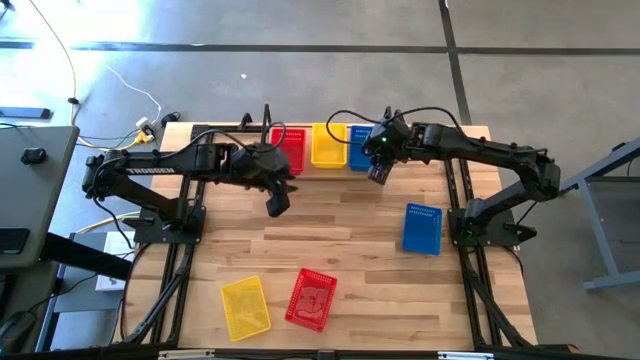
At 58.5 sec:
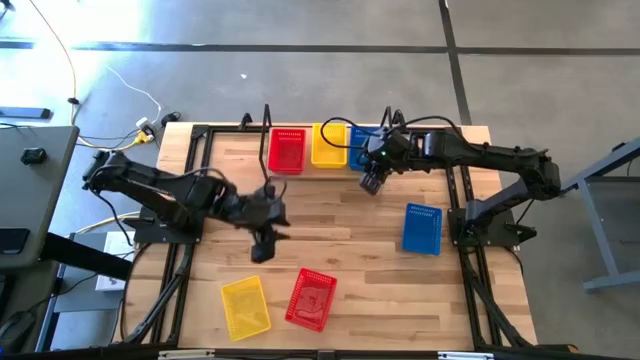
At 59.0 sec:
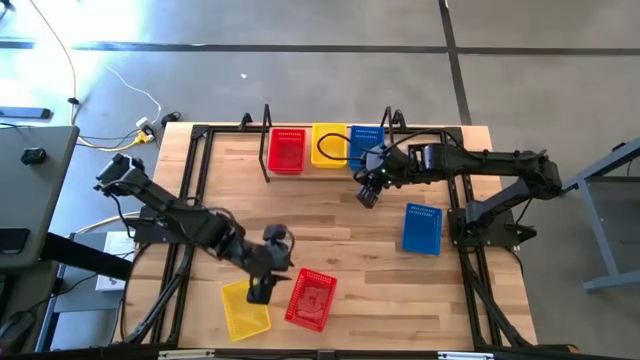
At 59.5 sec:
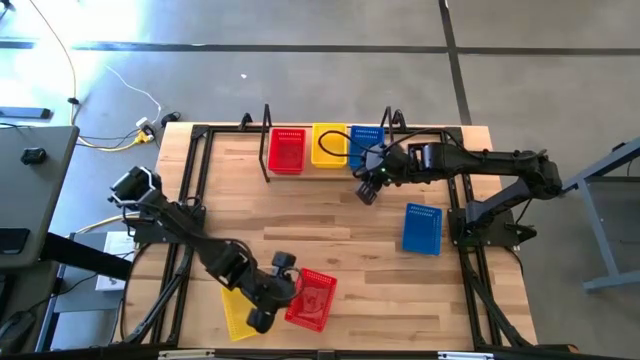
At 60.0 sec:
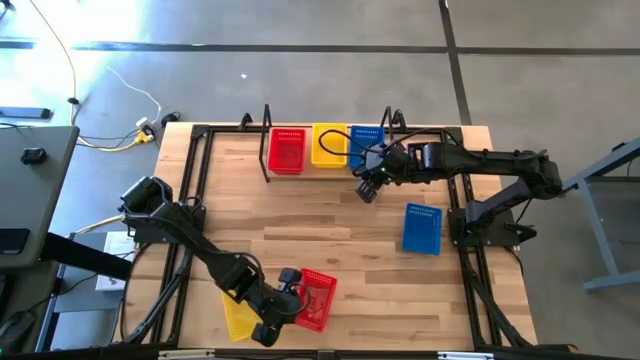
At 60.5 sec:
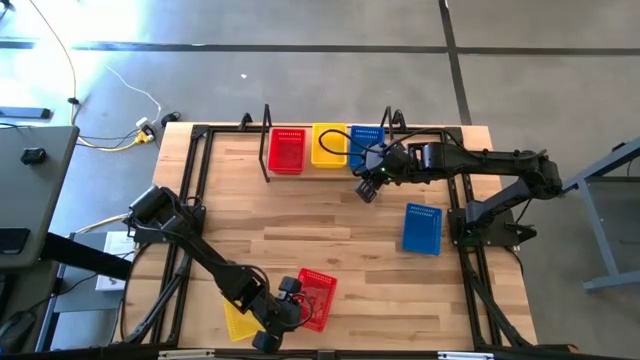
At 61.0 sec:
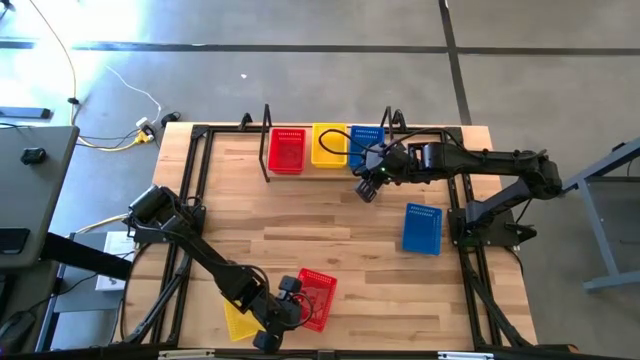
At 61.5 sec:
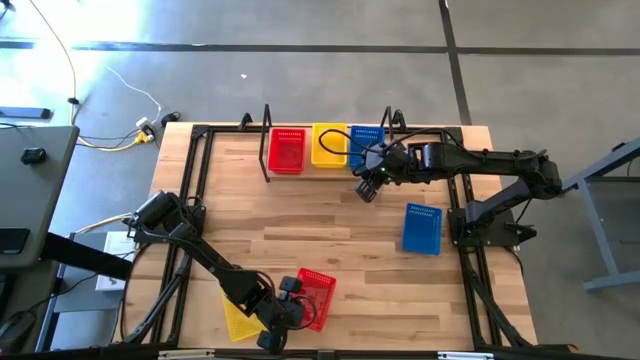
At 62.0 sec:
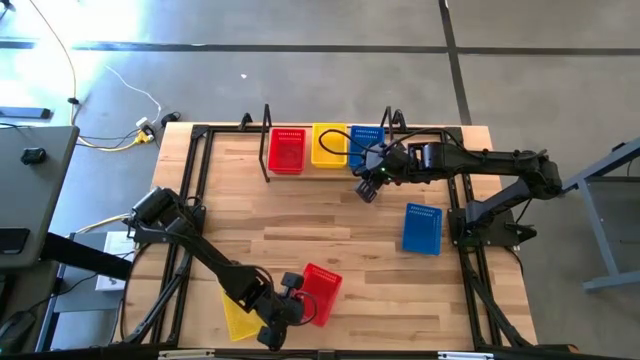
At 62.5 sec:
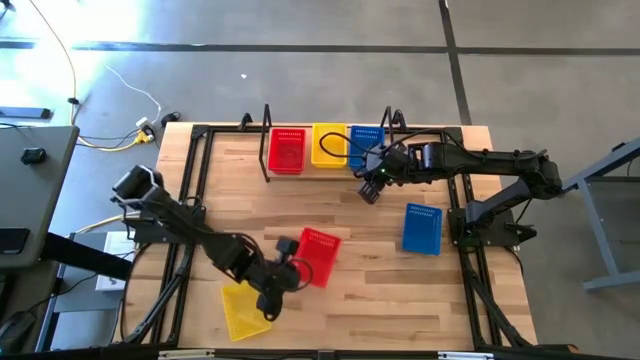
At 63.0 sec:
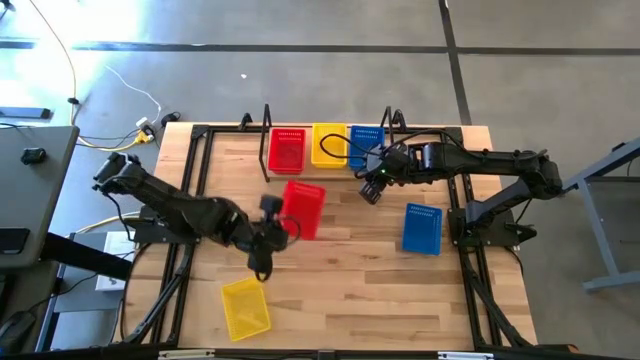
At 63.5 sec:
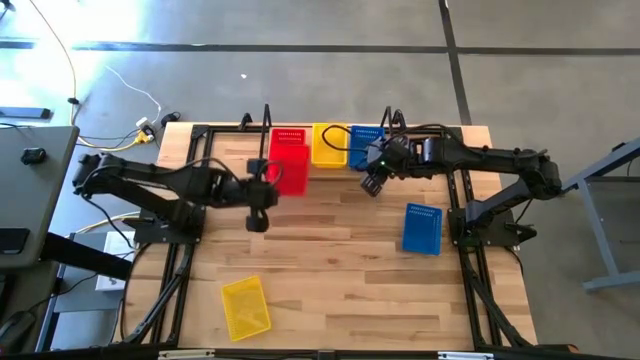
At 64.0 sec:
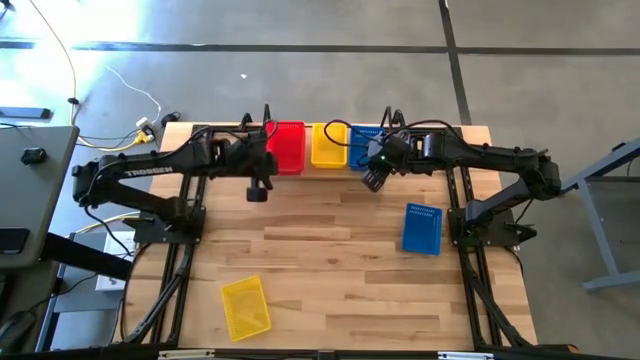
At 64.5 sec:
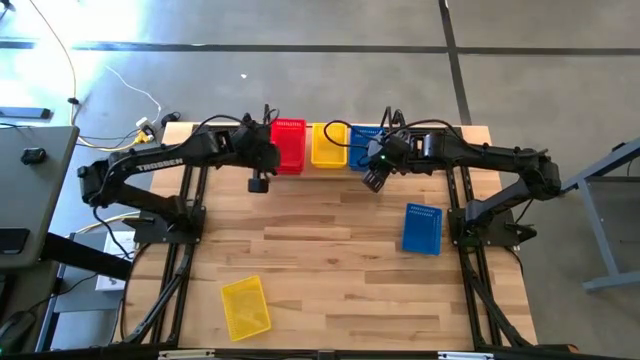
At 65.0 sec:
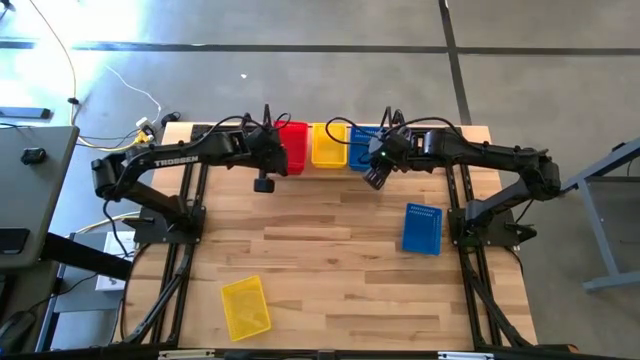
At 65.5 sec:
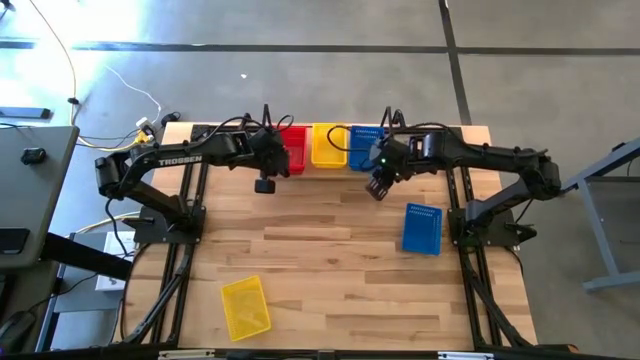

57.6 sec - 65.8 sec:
Task: Stack baskets on shelf by color
Stack the red bin on top of the red bin

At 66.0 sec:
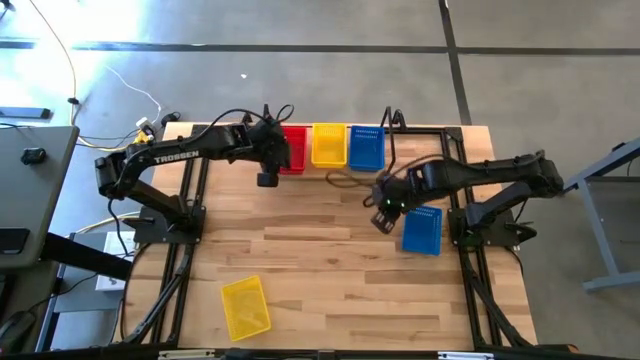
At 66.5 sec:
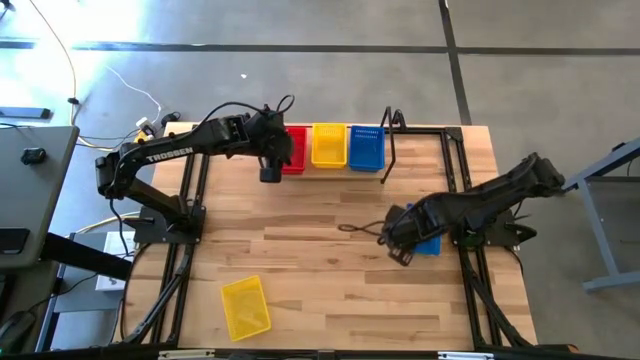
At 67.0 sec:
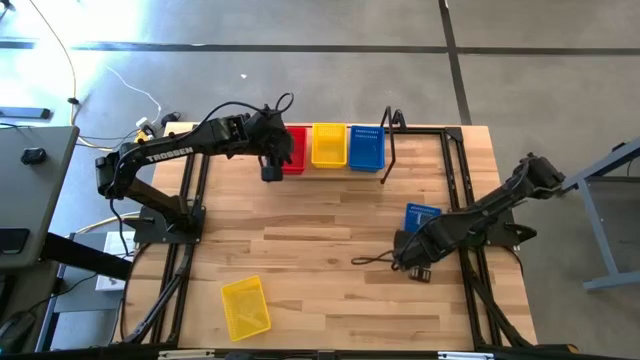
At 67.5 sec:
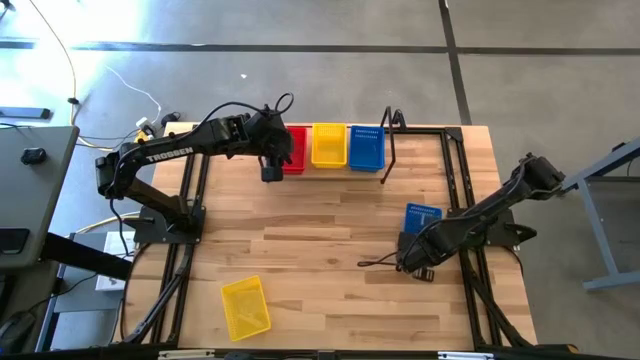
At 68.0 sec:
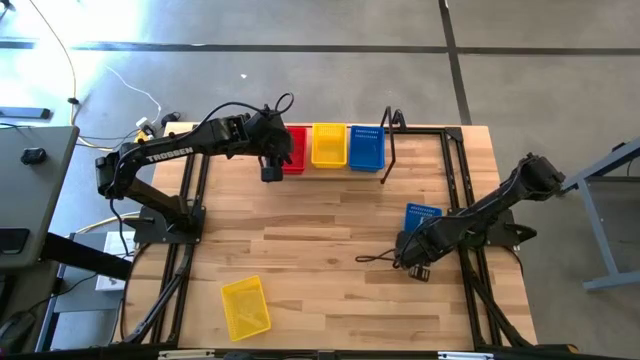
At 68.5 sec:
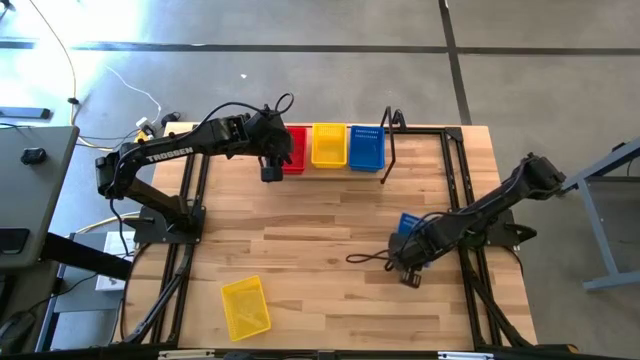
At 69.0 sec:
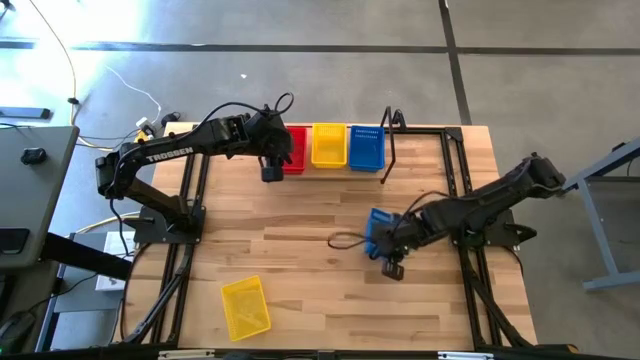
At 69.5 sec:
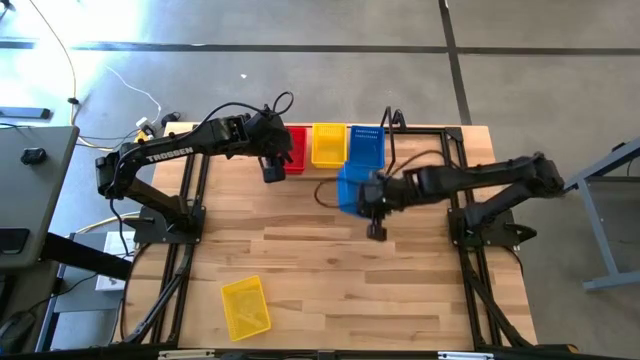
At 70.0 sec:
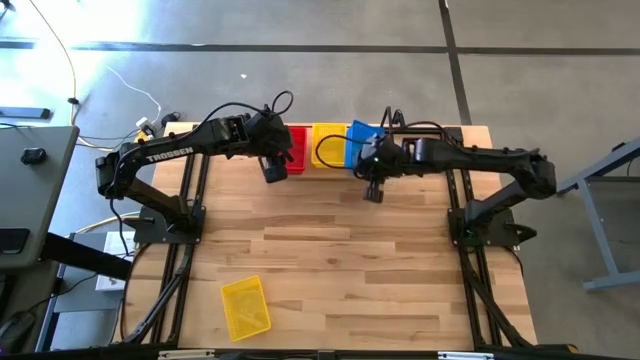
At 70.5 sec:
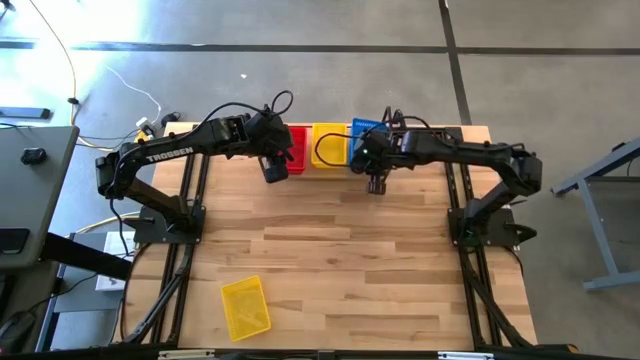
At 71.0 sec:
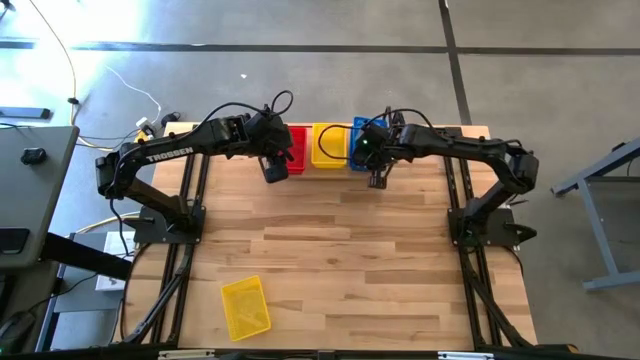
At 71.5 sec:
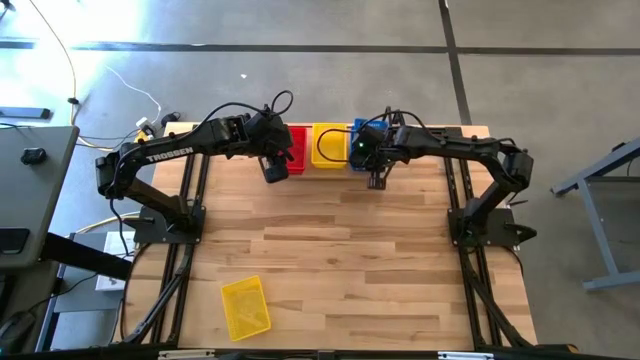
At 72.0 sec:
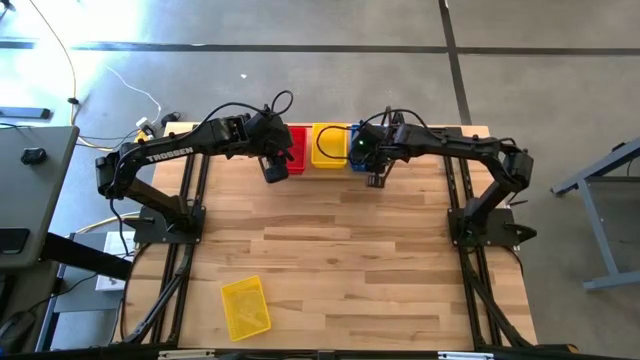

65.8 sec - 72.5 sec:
Stack the blue bin on top of the blue bin

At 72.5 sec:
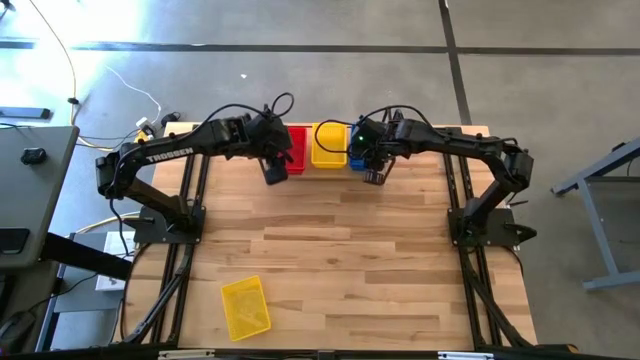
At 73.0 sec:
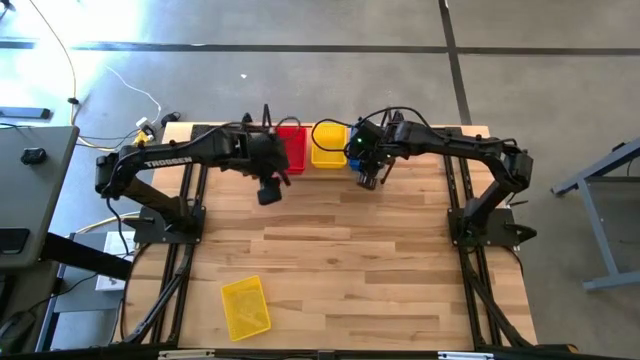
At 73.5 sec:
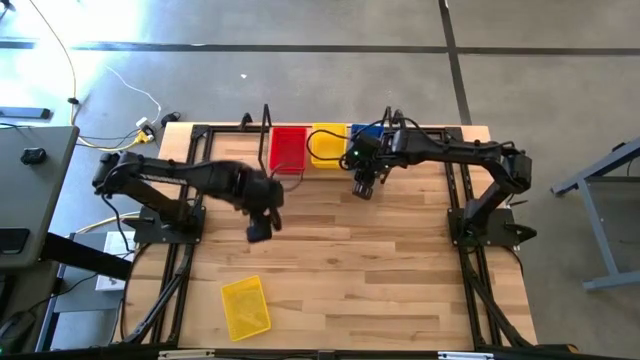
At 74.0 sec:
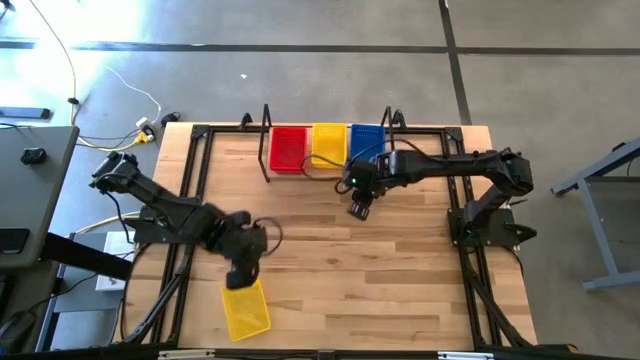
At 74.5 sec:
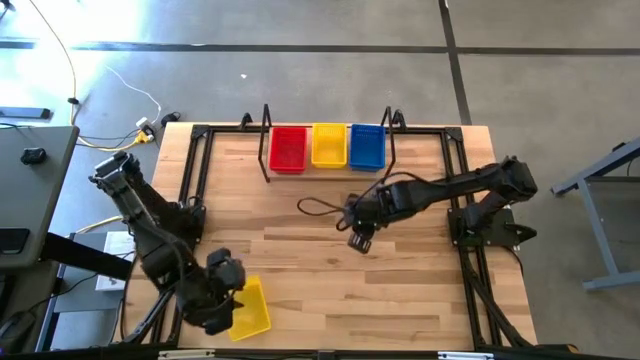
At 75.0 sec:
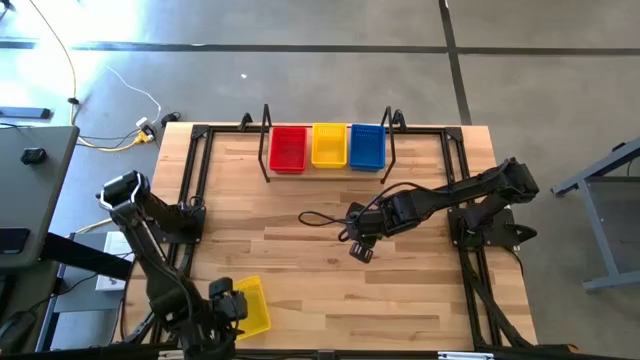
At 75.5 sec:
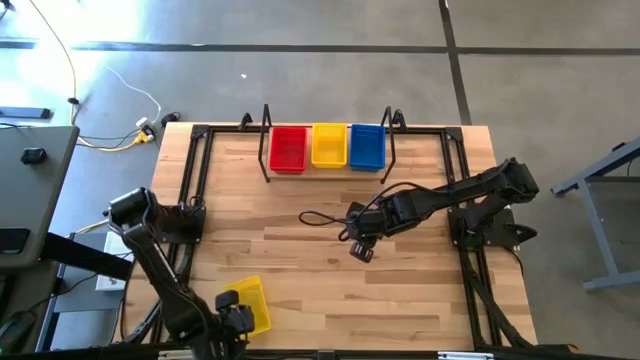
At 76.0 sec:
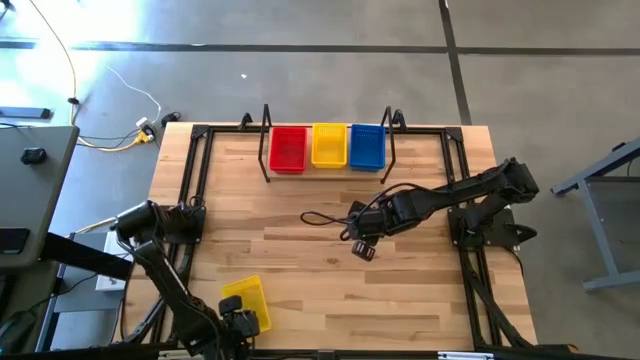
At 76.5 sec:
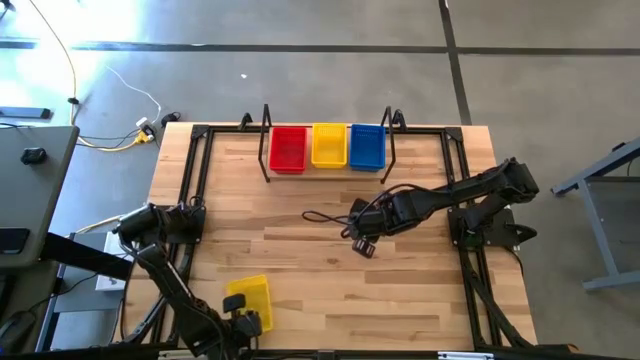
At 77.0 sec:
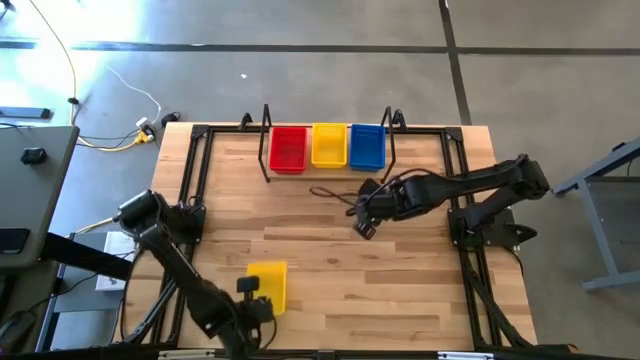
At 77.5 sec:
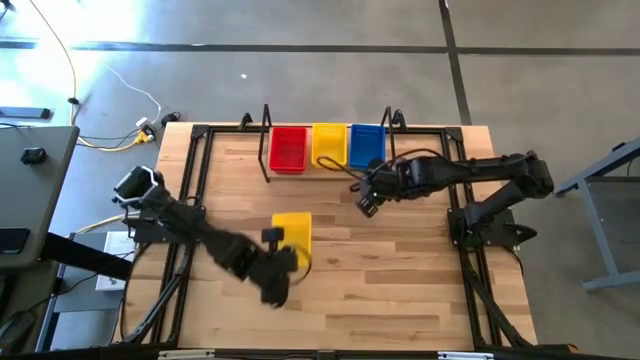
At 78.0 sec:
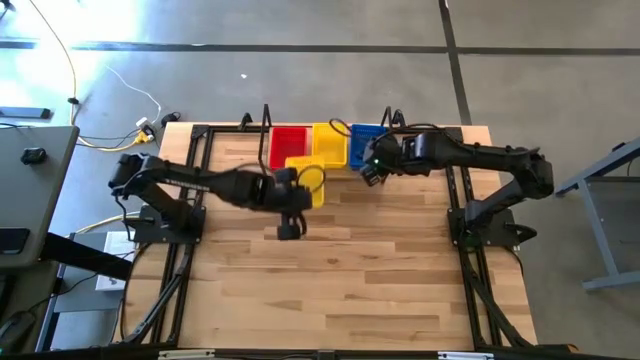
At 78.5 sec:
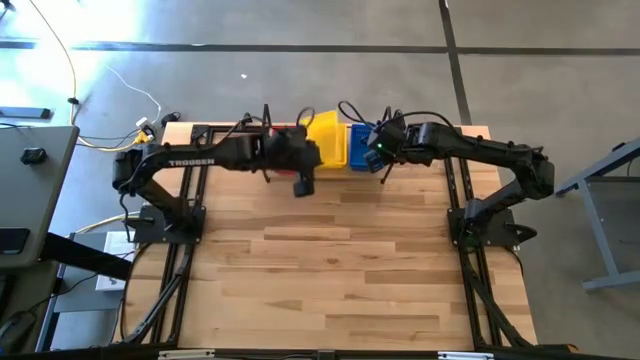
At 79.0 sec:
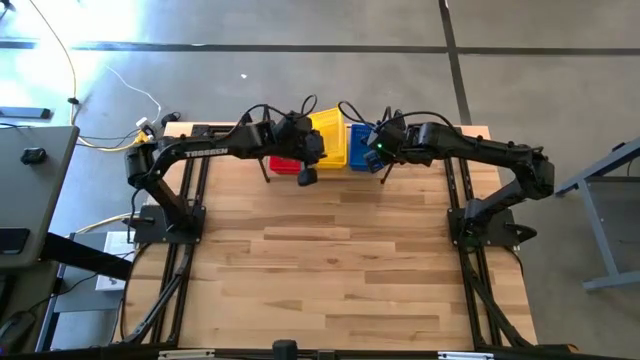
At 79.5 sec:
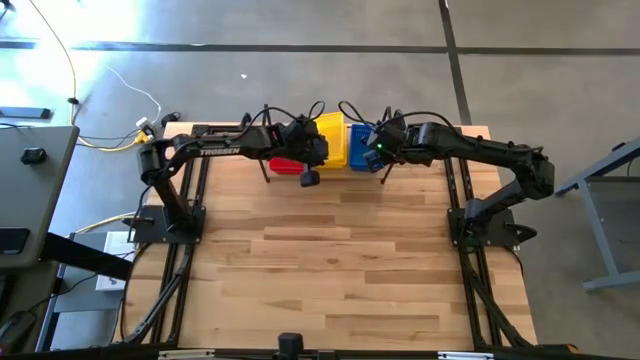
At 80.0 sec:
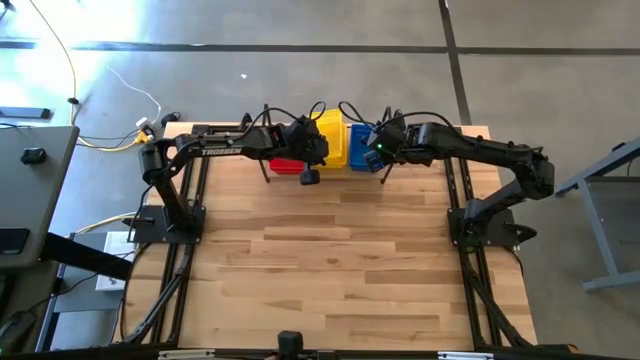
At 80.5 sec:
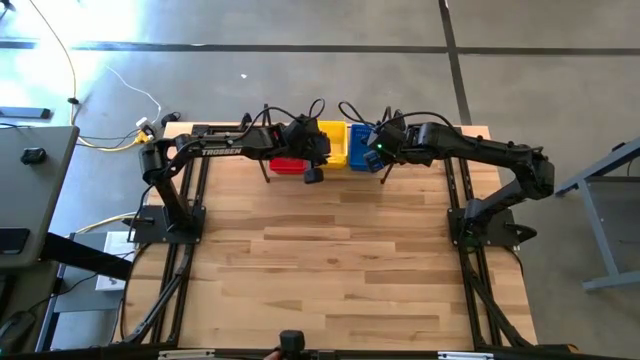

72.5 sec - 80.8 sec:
Stack the yellow bin on top of the yellow bin
